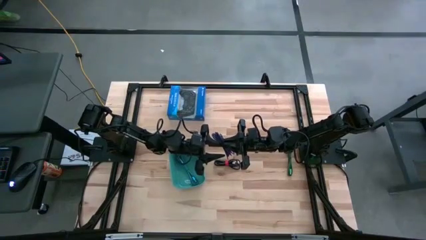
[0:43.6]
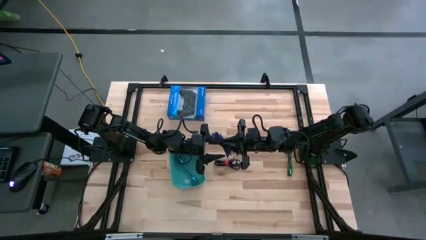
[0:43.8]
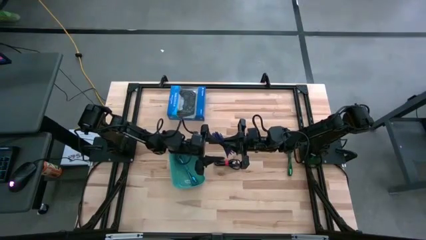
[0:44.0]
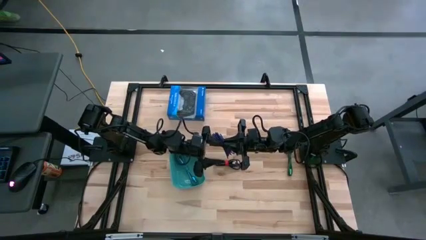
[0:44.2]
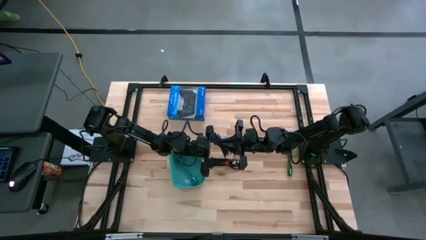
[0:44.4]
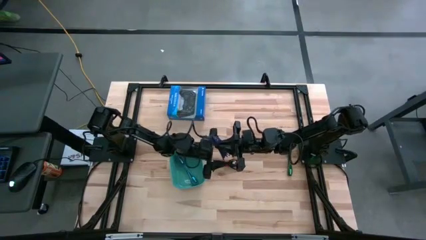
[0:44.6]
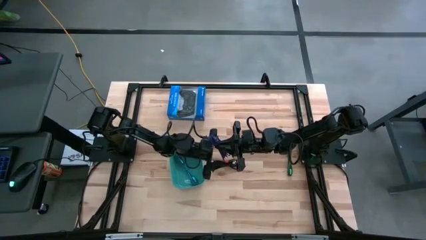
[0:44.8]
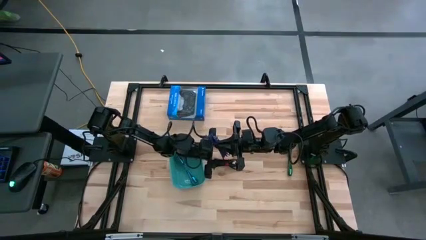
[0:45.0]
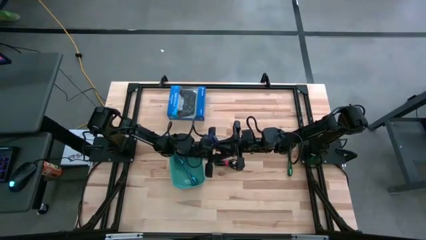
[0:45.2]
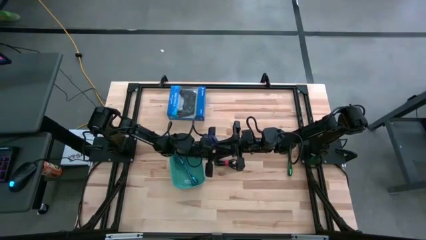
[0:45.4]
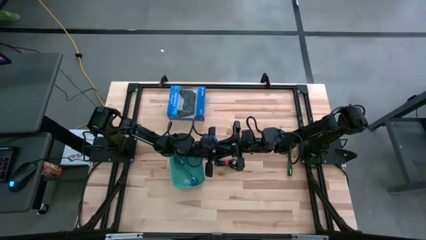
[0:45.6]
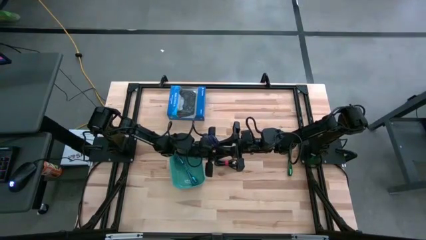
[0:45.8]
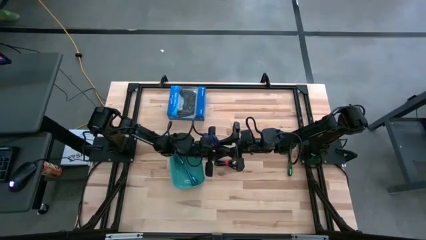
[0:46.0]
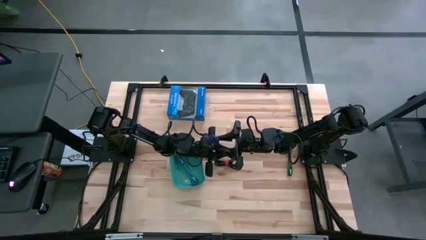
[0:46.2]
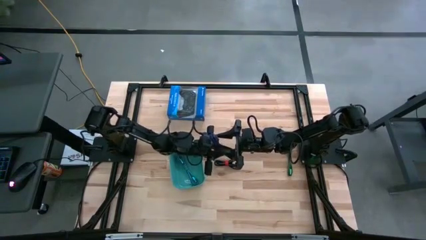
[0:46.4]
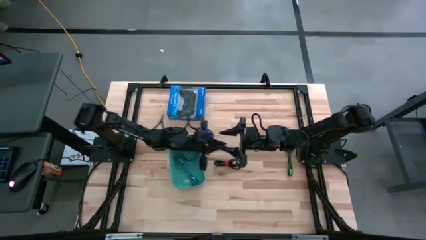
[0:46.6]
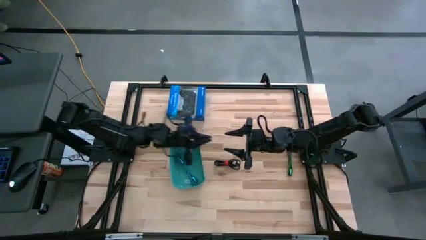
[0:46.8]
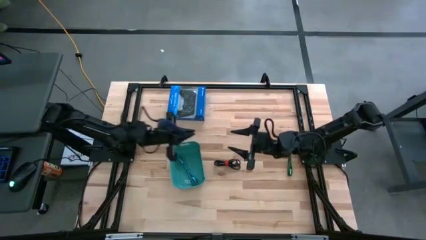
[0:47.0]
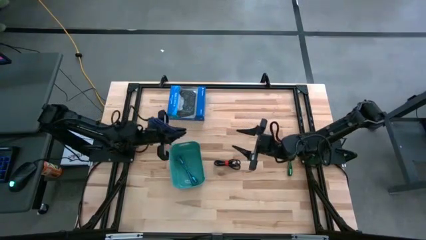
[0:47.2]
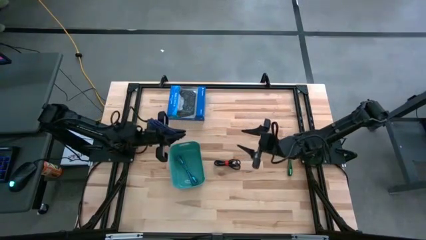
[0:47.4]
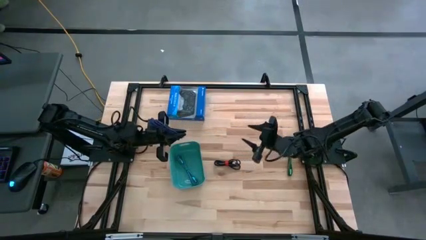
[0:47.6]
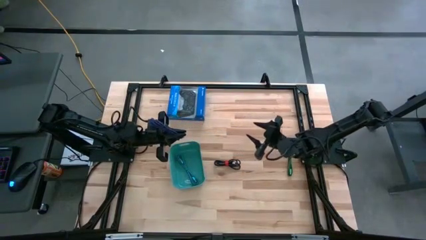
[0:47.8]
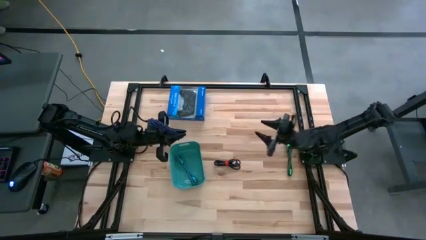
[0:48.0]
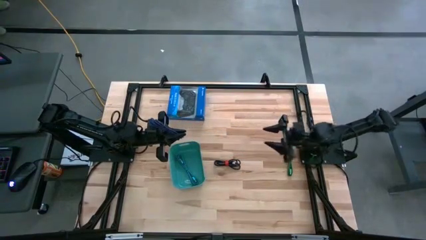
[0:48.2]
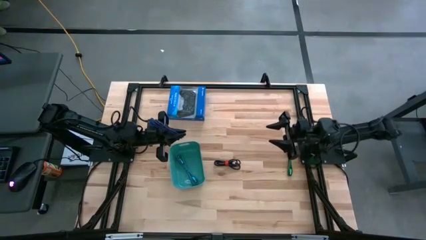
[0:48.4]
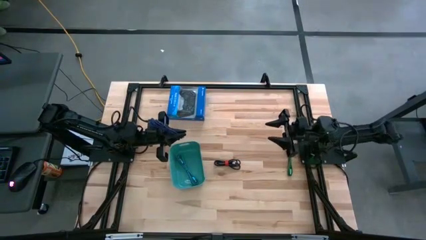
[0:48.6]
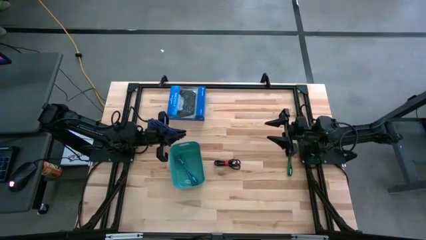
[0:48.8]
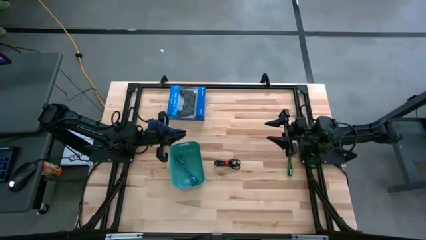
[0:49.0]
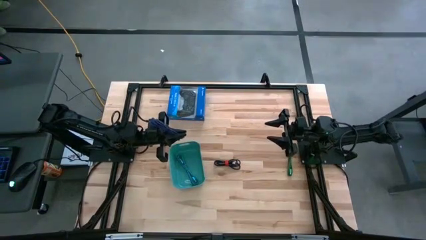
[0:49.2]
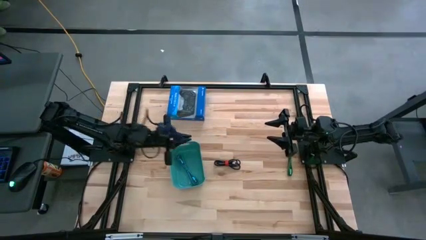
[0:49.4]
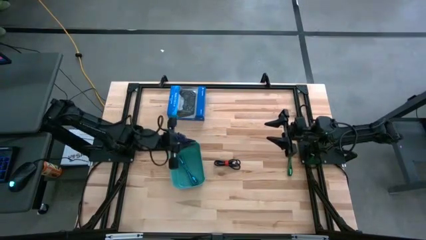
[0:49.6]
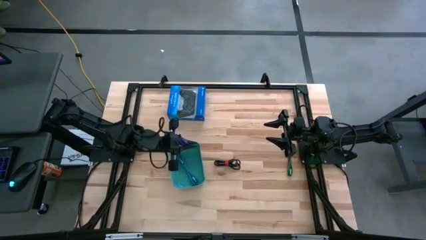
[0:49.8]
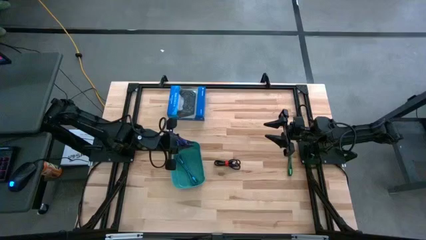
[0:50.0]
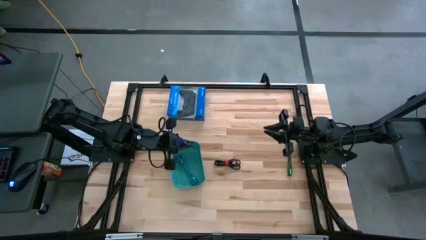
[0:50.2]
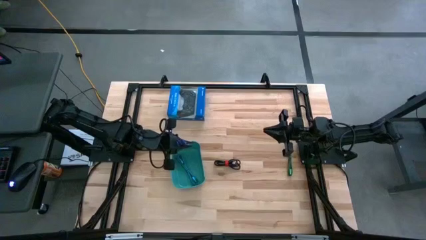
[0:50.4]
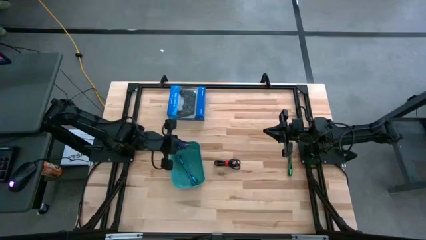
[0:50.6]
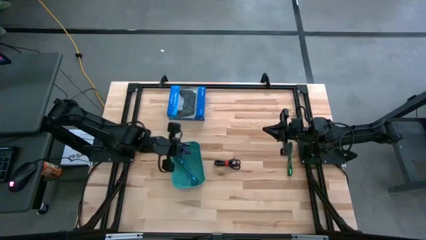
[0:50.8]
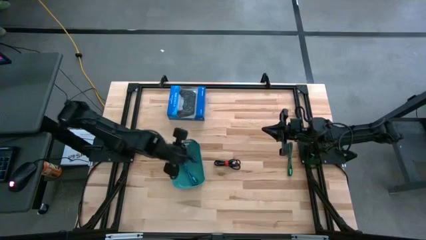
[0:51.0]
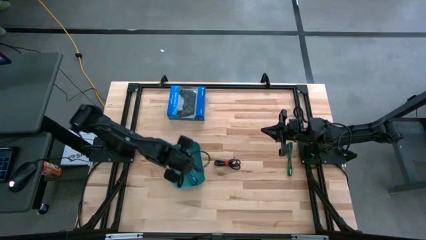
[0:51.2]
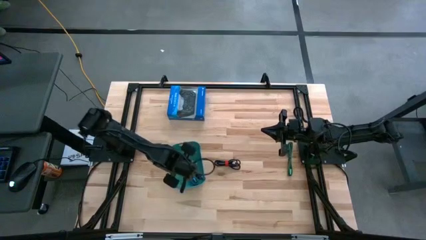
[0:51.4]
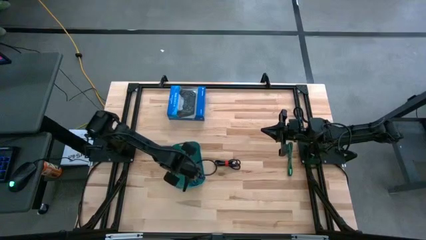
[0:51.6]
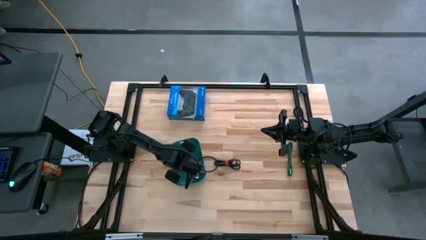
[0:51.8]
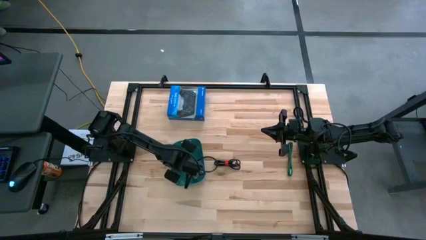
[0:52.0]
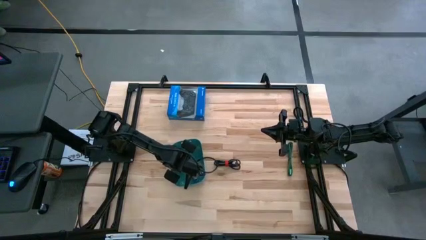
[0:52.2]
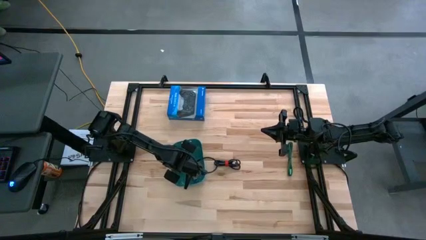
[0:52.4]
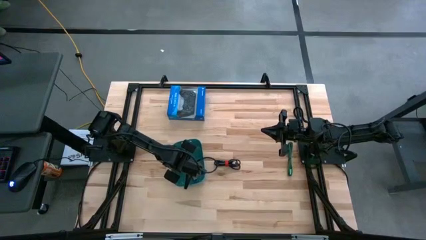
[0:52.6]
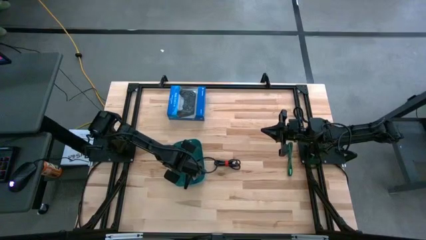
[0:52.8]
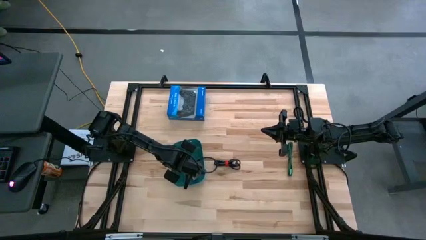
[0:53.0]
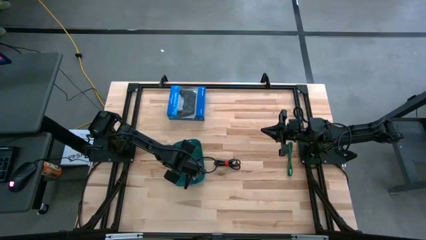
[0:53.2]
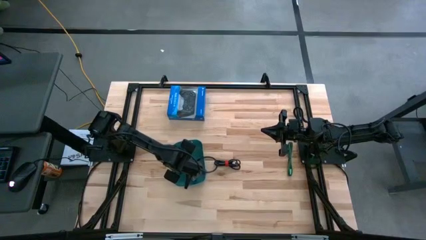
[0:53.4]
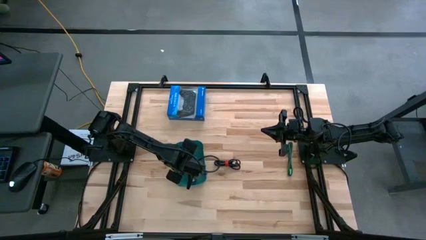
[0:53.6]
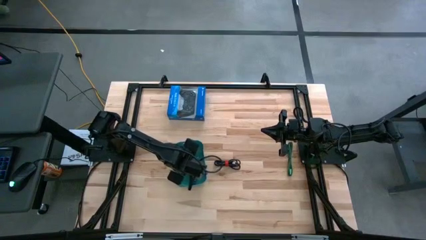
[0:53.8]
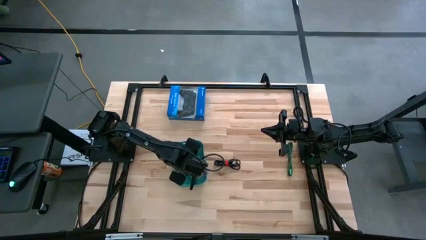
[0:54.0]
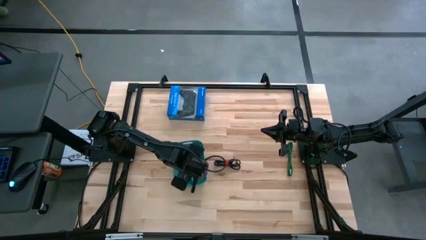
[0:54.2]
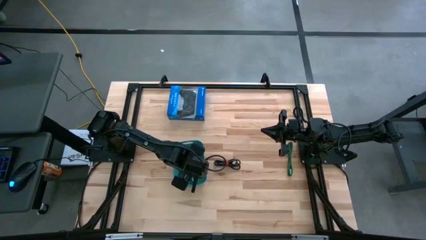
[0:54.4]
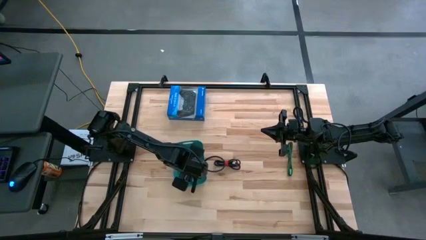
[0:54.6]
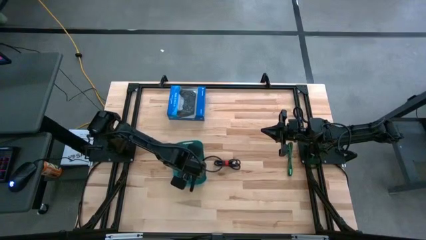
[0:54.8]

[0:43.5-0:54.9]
Task: Pick and place USB-C Cables
Put the violet charger cable into the green bin
